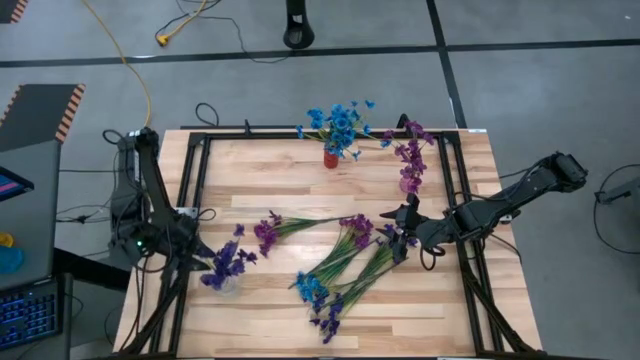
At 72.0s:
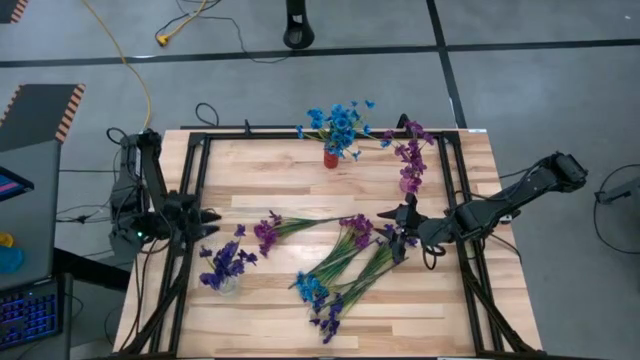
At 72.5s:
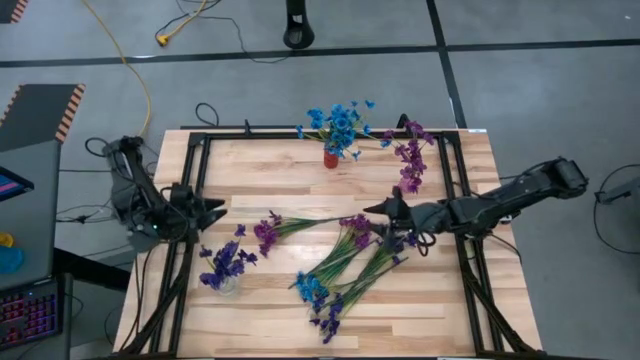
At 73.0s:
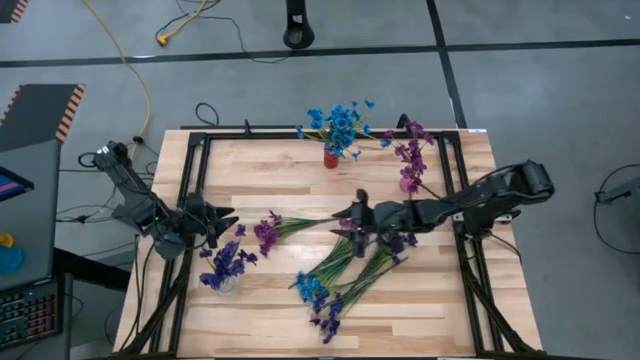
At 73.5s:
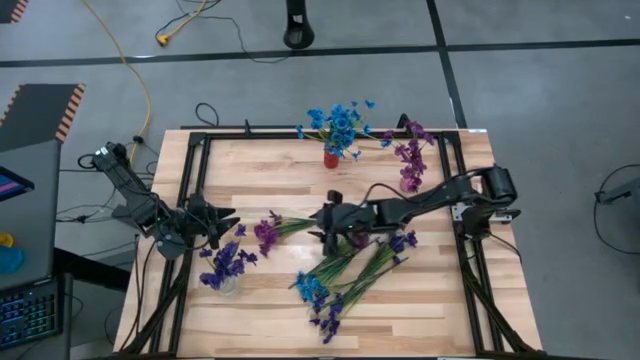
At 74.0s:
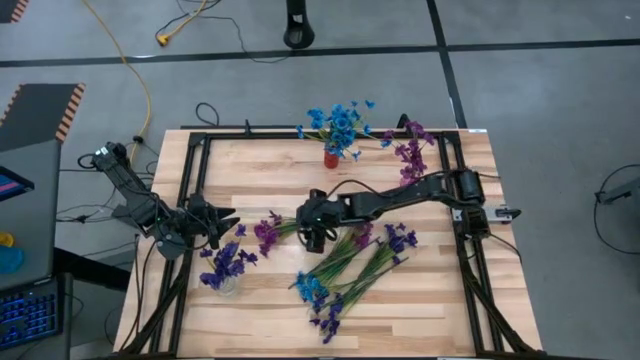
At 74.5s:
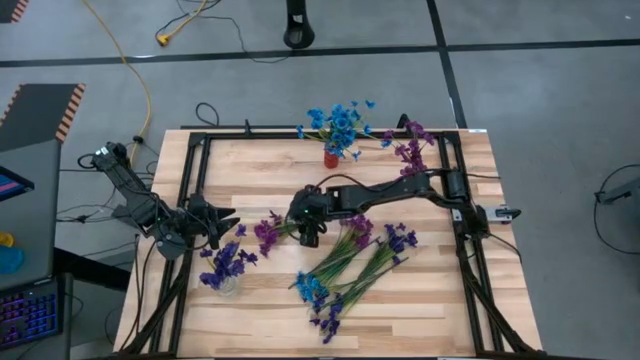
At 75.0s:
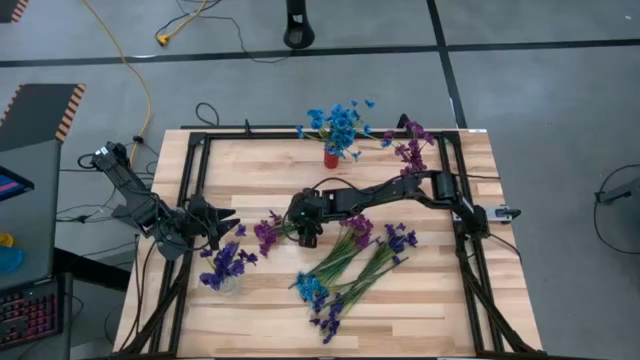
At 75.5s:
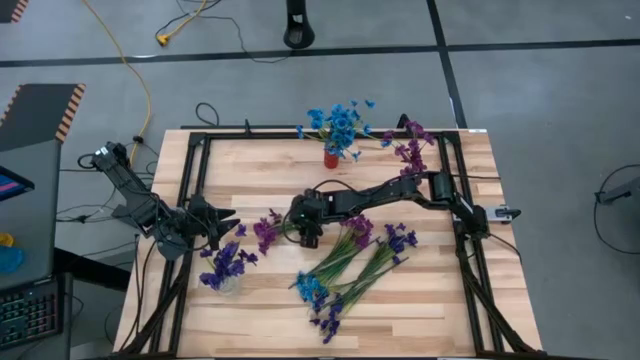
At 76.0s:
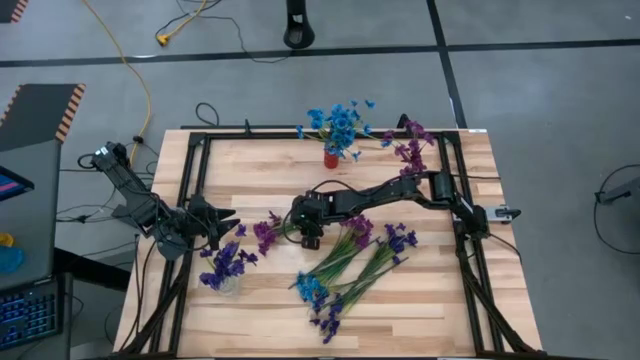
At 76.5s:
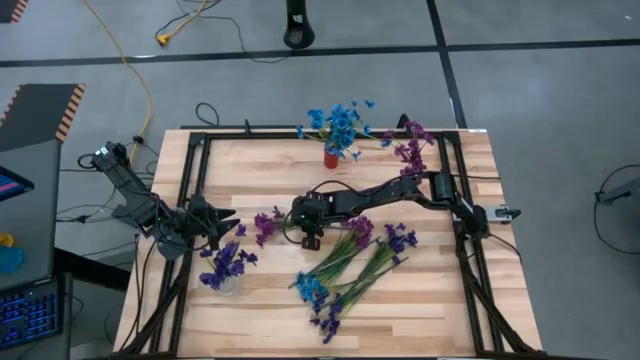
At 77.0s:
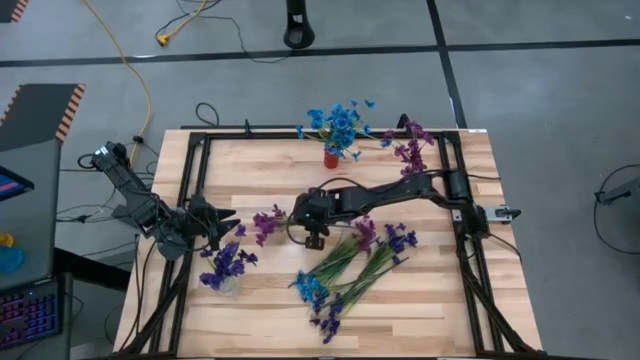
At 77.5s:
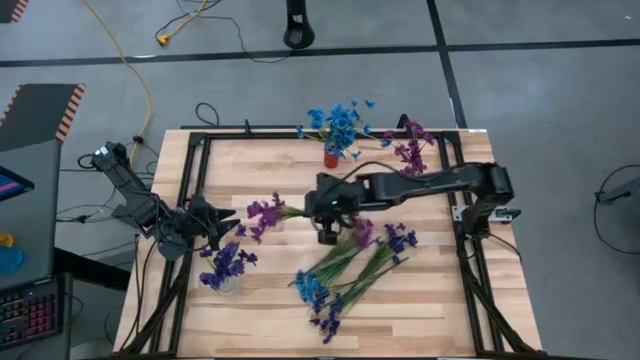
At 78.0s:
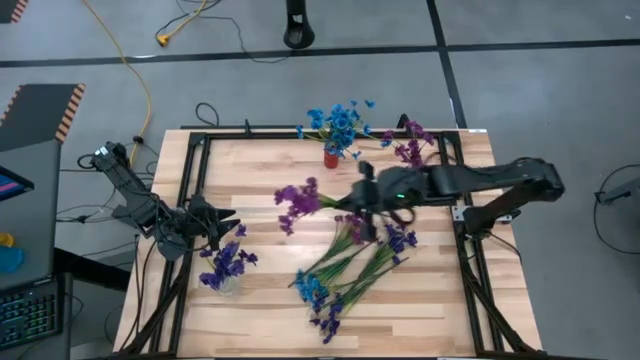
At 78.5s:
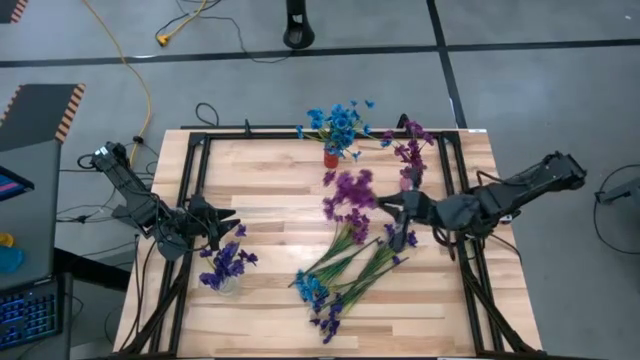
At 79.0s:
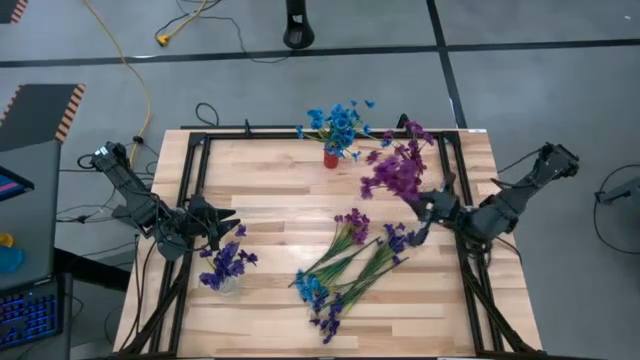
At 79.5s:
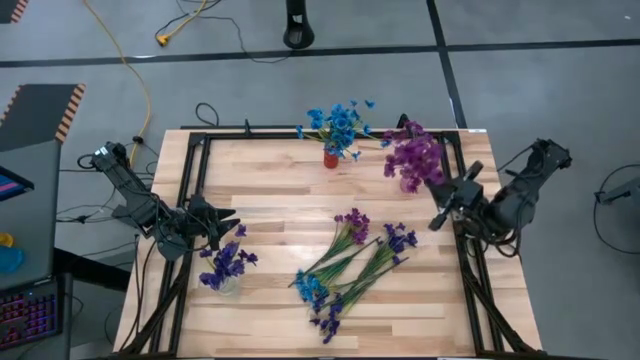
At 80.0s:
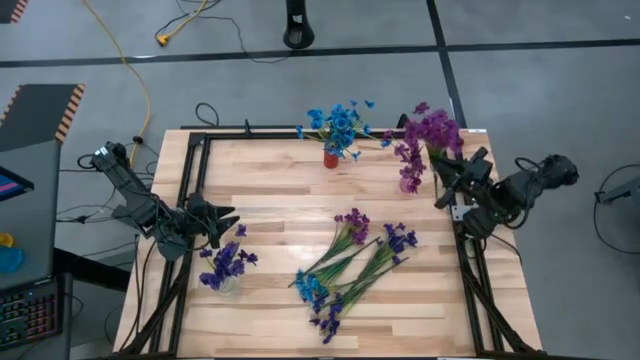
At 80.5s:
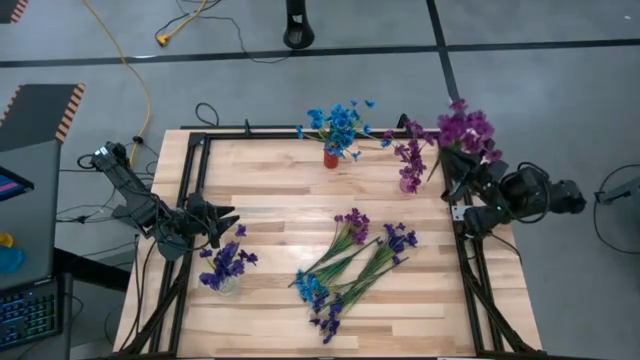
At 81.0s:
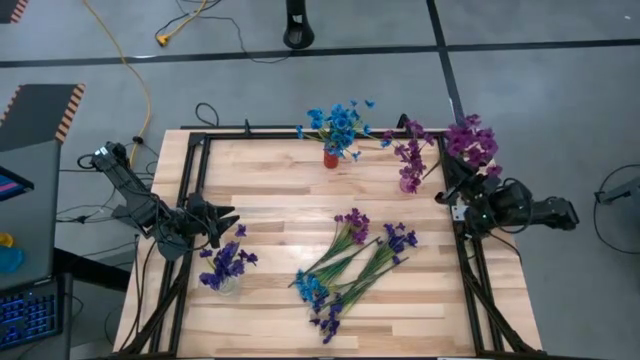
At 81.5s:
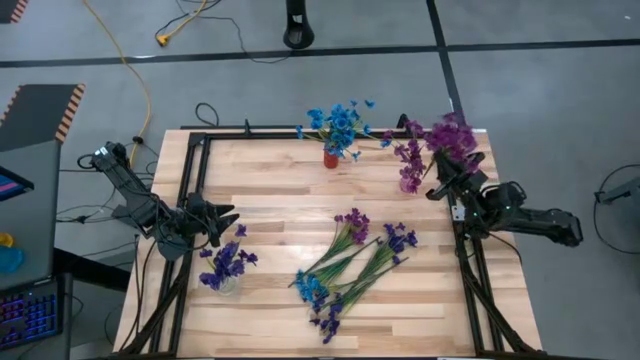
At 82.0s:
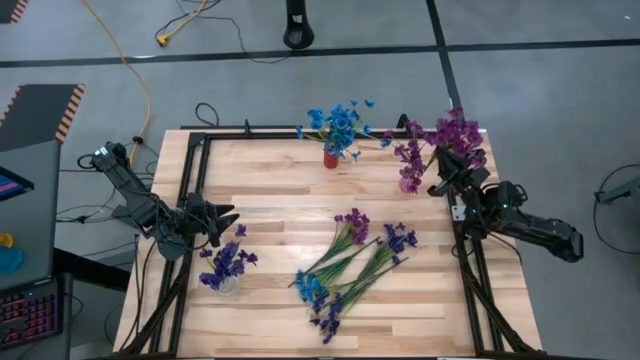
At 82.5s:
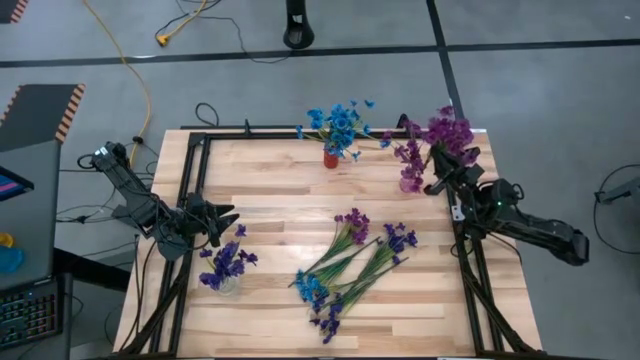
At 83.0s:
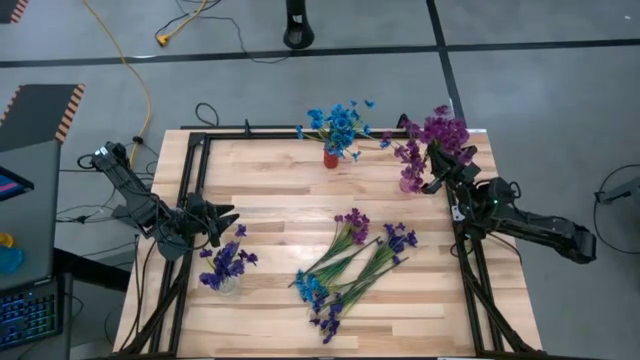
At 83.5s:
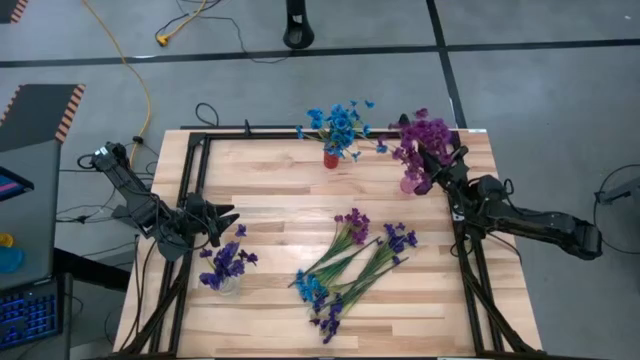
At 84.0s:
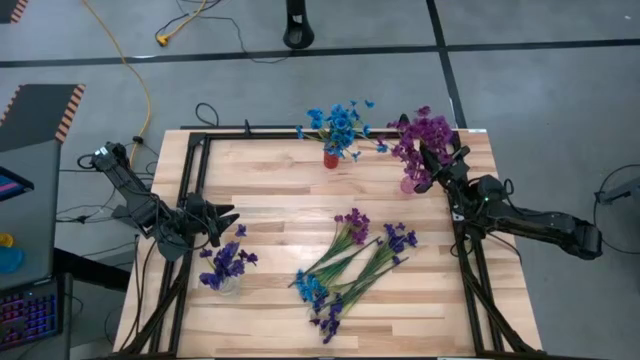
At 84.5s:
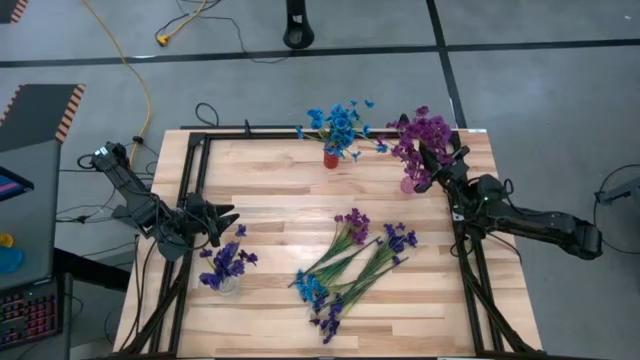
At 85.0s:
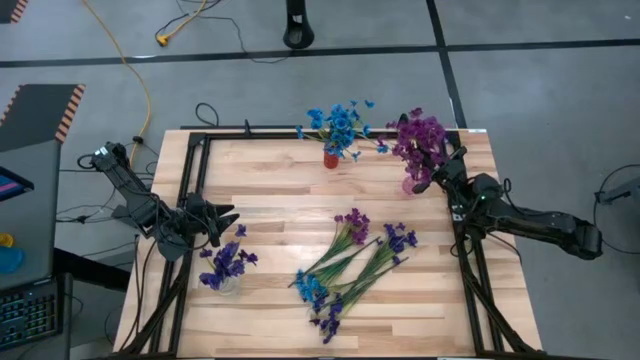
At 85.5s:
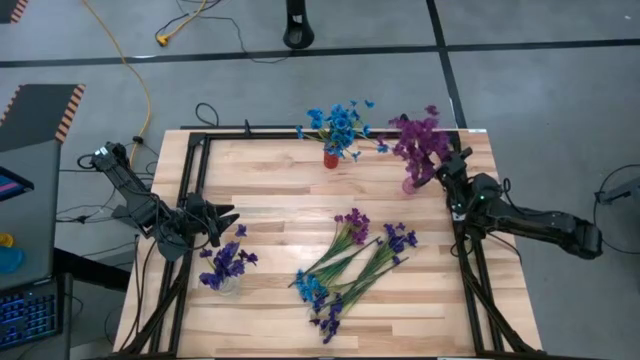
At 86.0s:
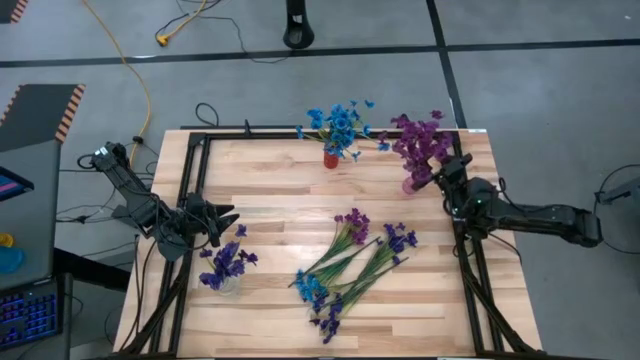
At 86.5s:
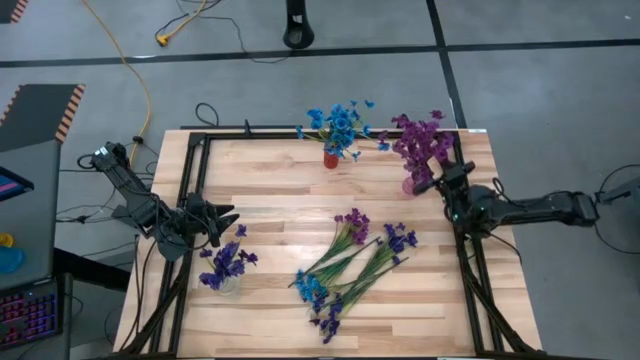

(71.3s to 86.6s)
Task: Sort flowers into vase by color
Put the top violet flowers into the violet vase

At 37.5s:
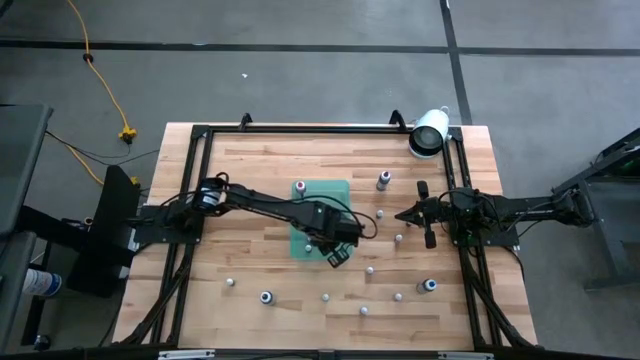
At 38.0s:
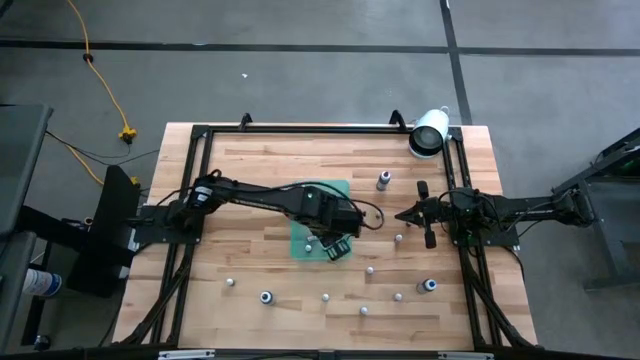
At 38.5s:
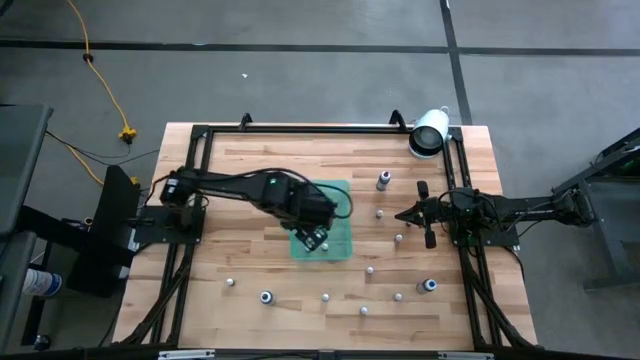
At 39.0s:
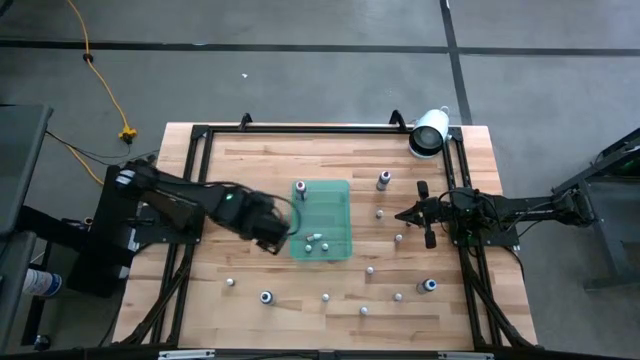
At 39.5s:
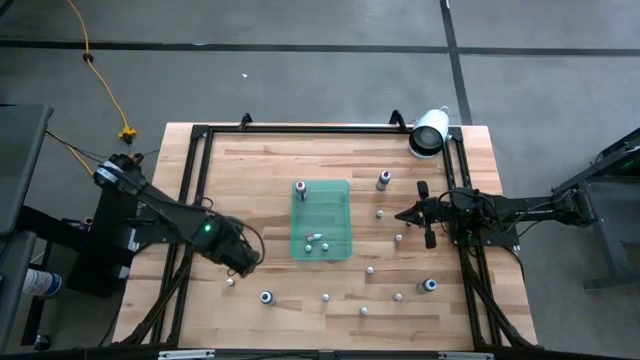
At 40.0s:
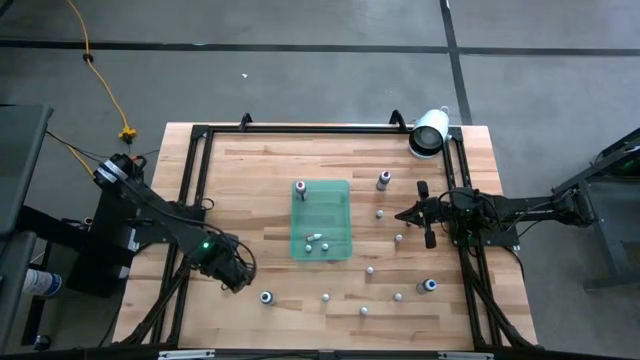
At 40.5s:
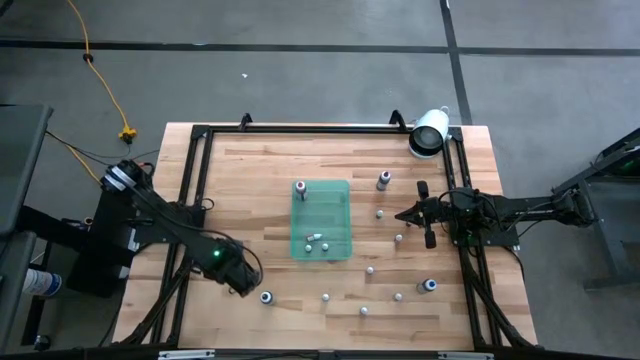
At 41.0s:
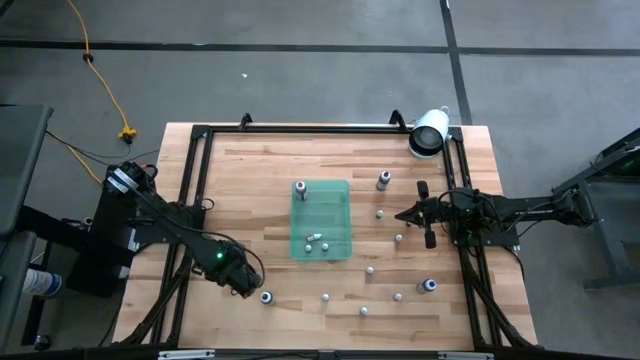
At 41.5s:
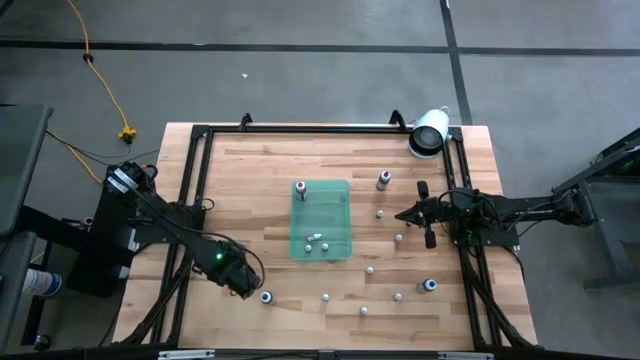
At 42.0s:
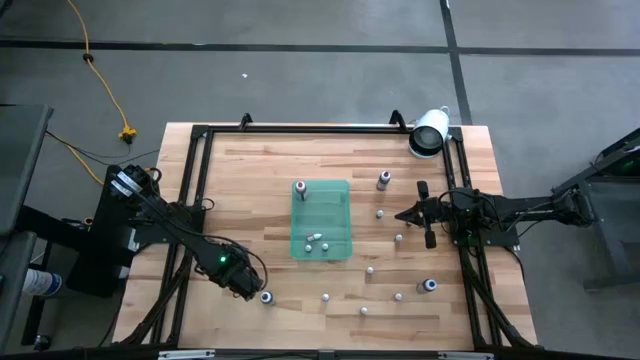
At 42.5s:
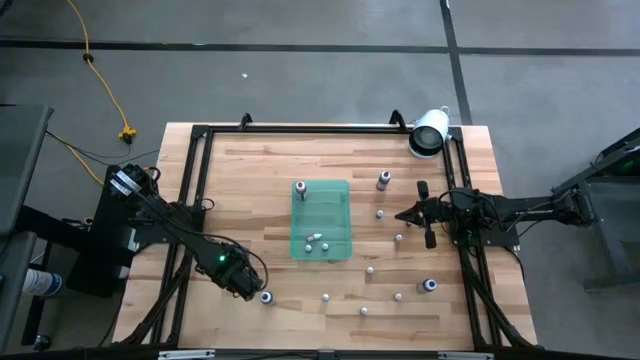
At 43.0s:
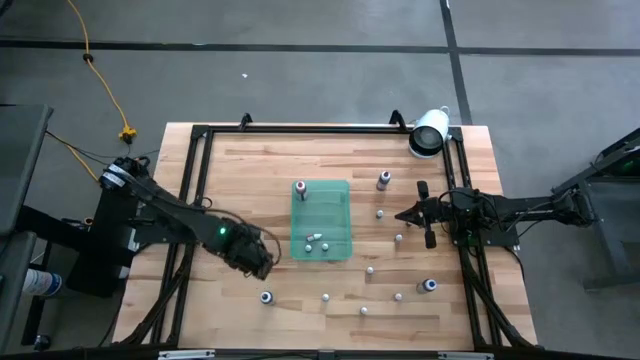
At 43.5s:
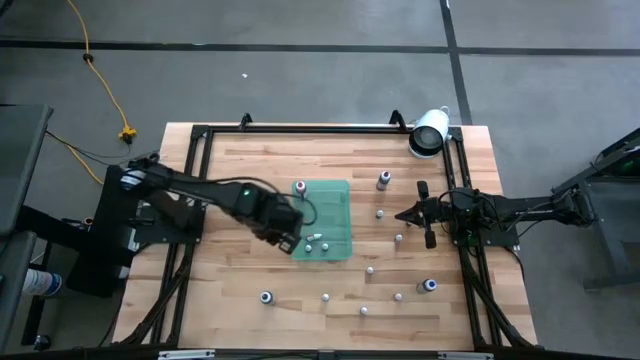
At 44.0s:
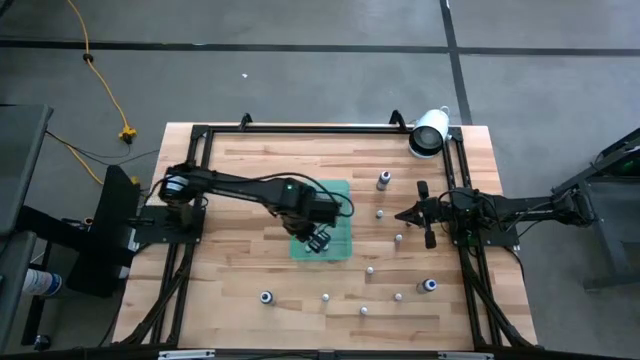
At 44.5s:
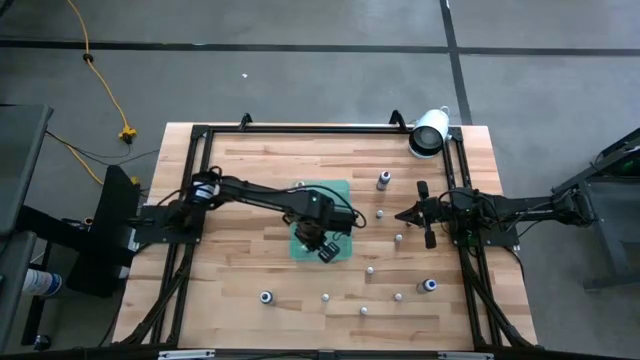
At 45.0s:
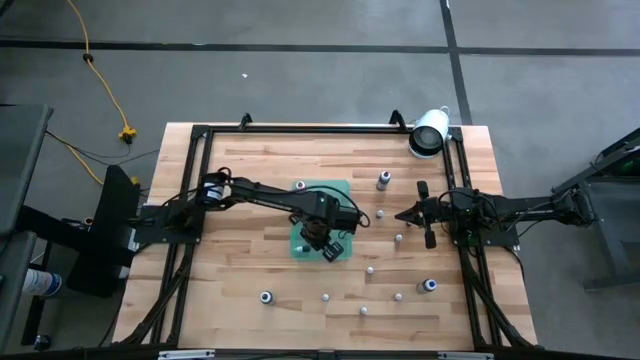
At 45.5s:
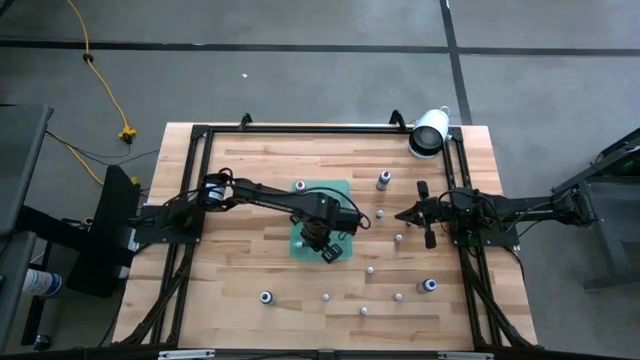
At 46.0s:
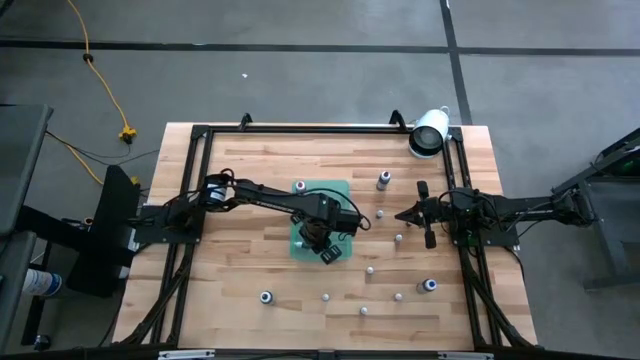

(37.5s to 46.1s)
Task: Pick & Place food coloring
Put the small green food coloring bottle into the green bin
